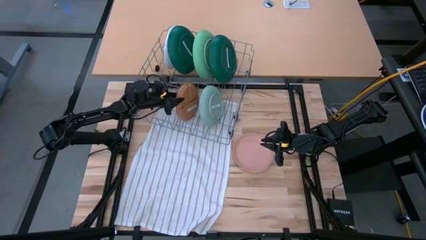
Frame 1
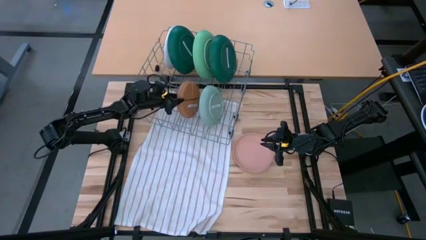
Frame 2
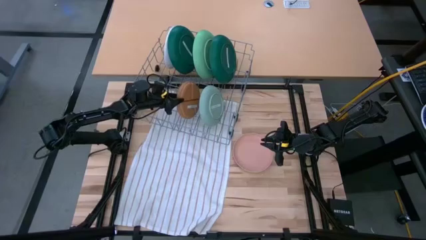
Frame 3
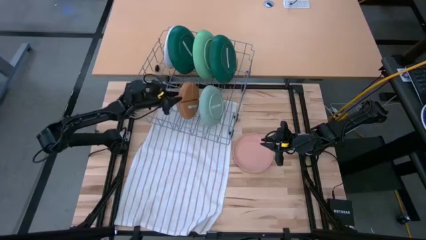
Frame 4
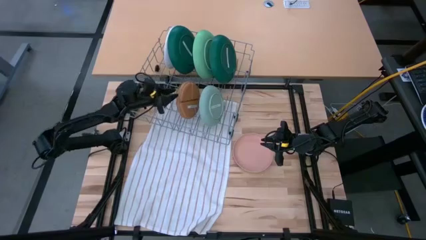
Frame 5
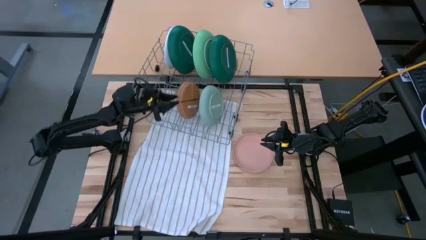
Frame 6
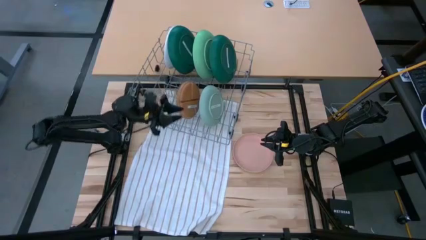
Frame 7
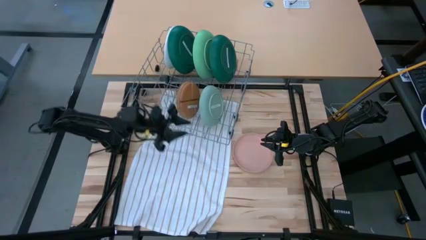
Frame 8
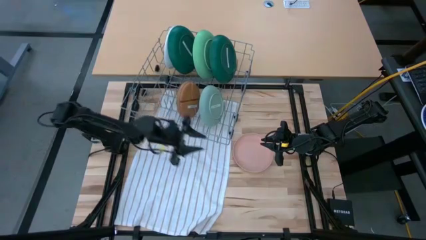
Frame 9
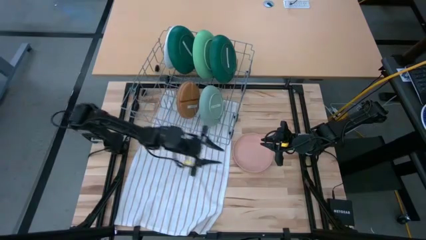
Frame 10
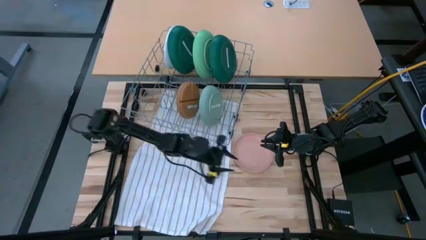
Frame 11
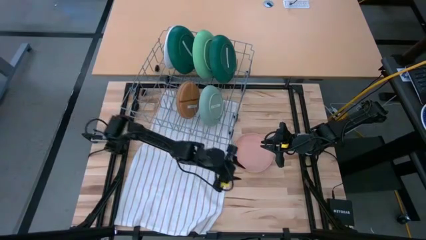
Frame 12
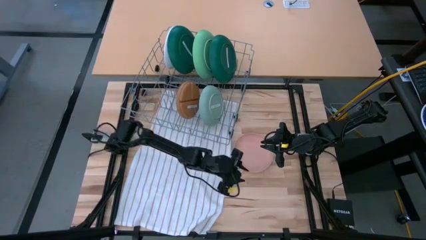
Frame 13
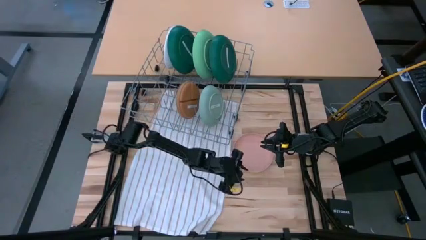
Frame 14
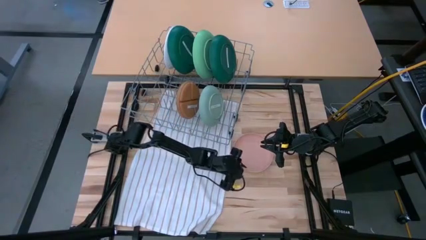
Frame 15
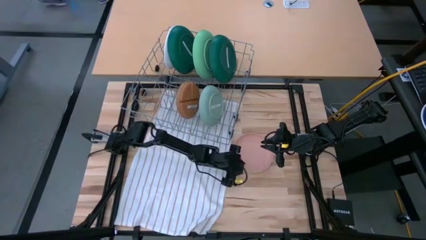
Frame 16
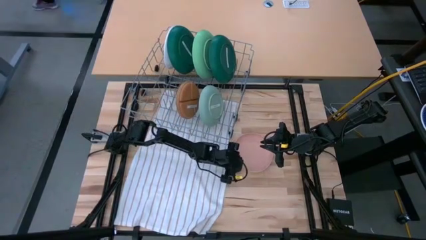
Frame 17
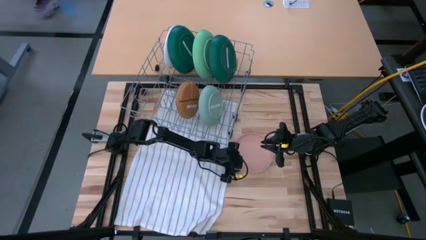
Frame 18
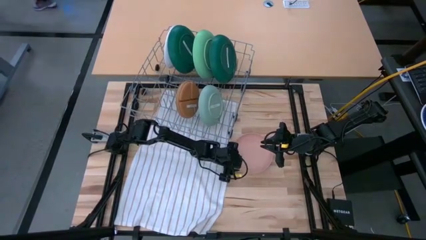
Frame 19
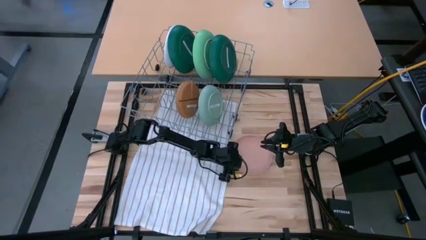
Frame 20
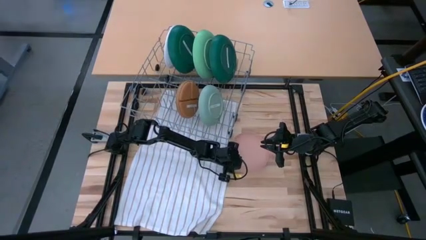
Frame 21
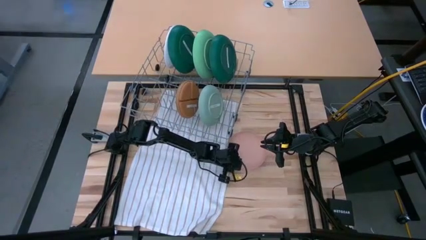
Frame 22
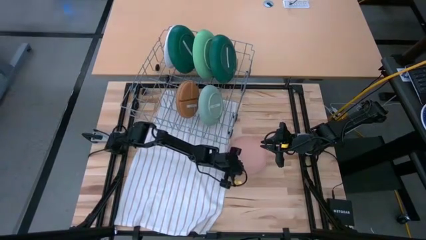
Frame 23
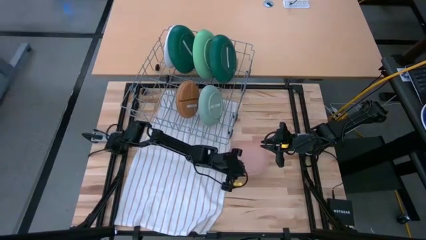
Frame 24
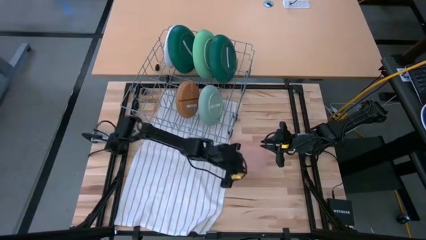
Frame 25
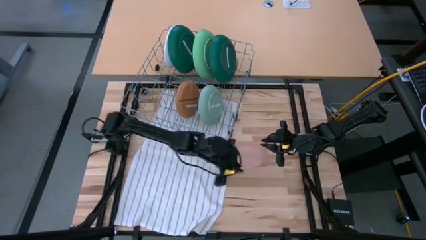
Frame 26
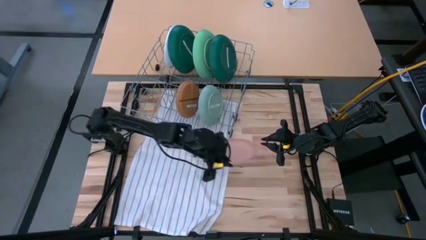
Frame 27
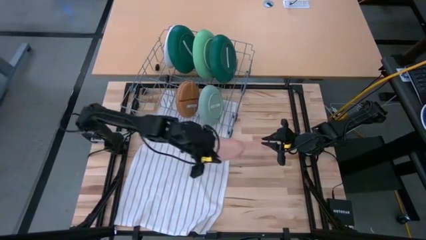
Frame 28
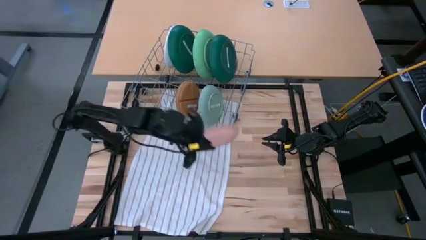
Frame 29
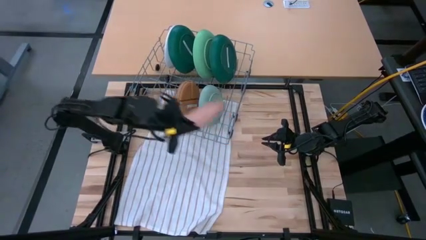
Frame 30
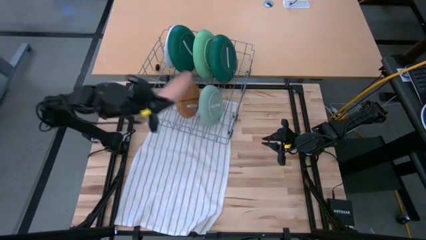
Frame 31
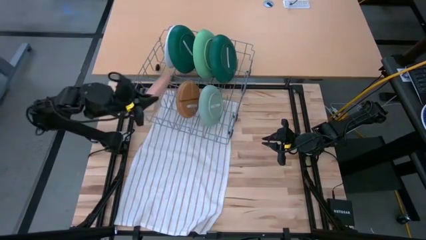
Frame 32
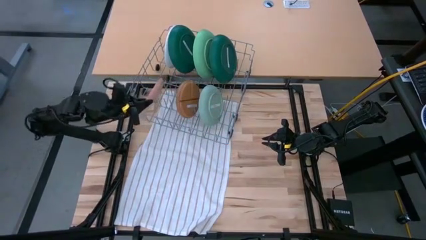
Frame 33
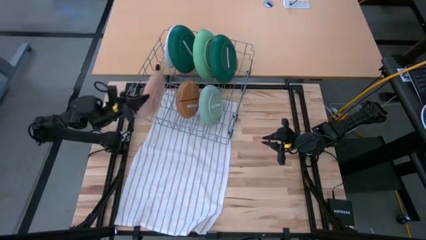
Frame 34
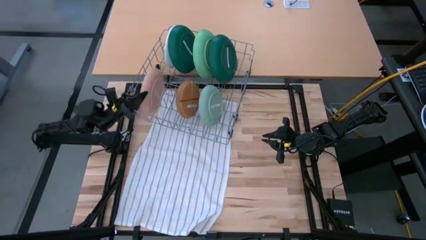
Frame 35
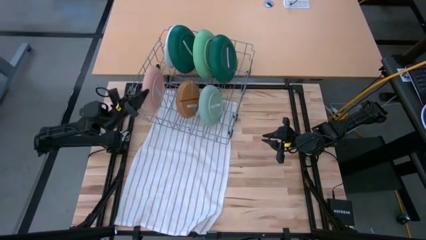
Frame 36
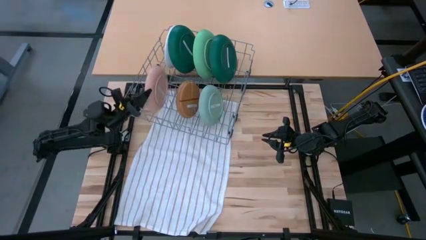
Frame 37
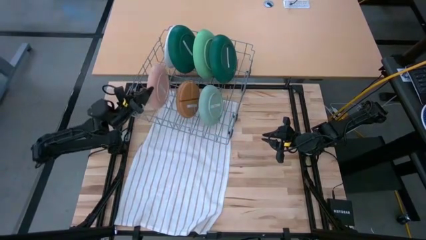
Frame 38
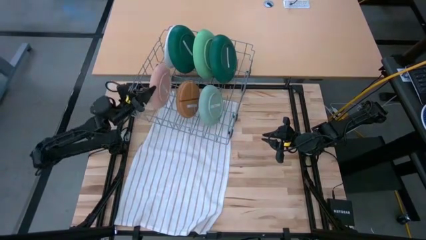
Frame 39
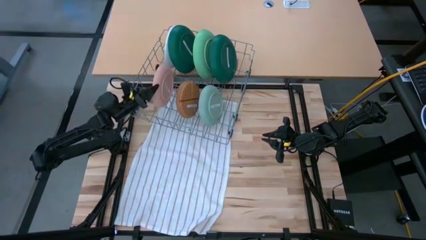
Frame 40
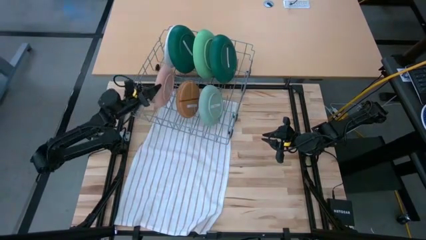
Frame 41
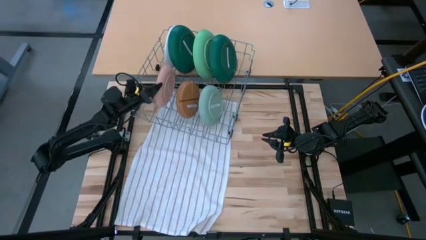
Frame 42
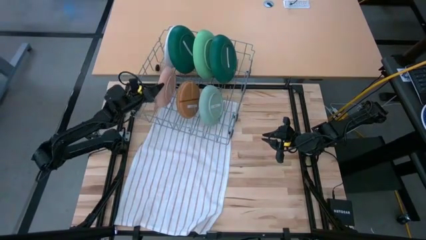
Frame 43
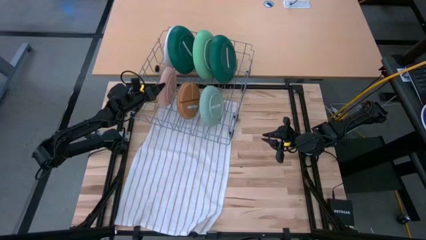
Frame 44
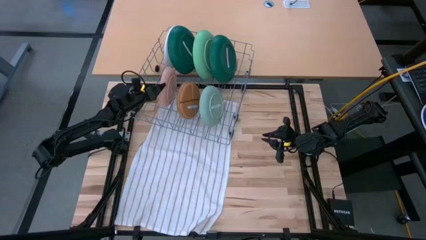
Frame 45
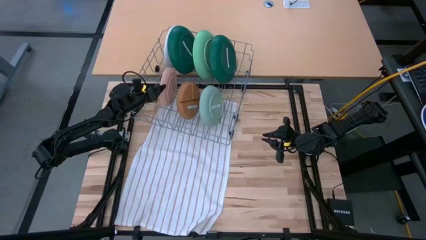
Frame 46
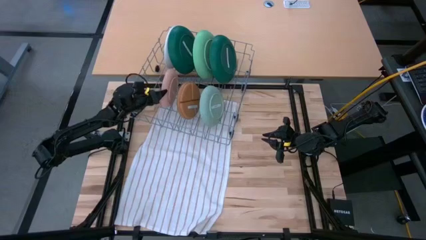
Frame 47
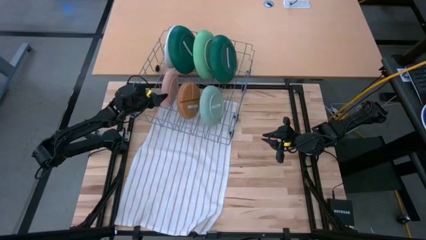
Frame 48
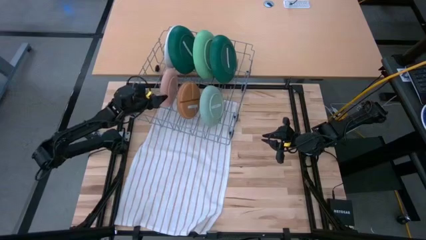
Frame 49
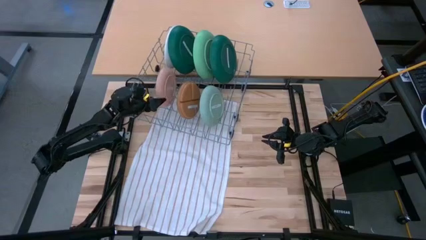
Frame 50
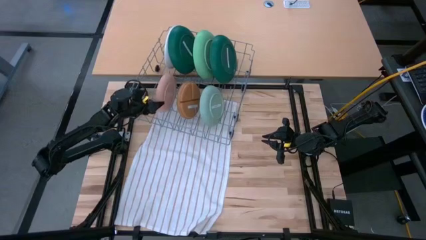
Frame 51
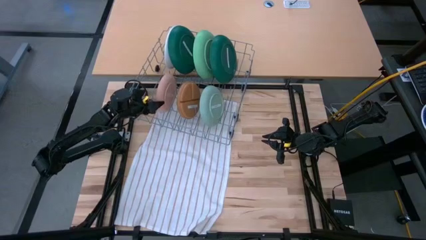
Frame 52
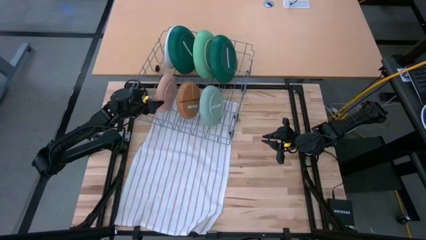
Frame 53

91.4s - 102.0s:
Task: Sort dishes
Put the pink plate into the dishwasher rack

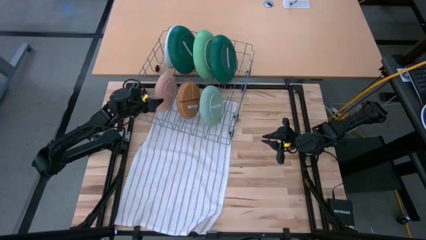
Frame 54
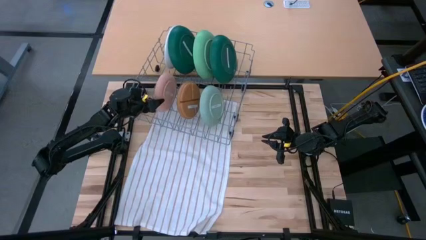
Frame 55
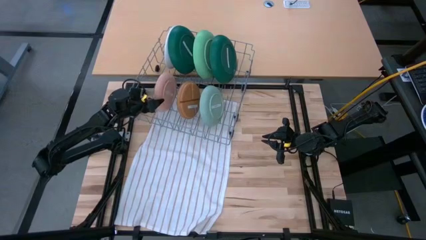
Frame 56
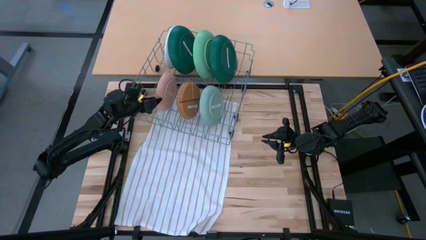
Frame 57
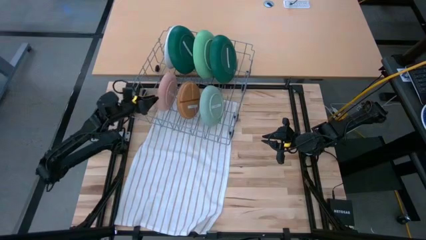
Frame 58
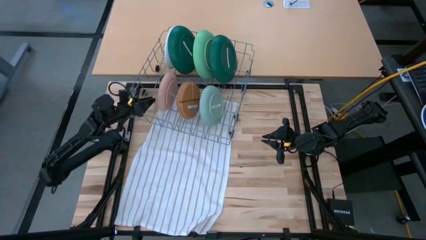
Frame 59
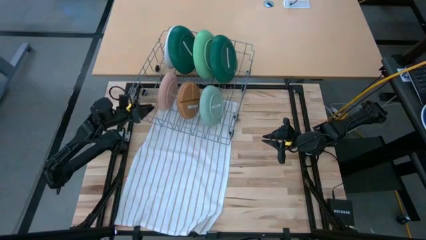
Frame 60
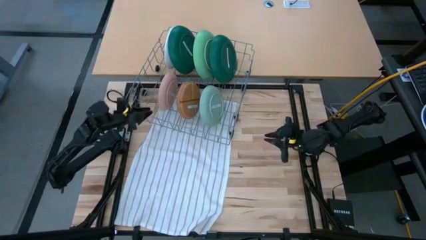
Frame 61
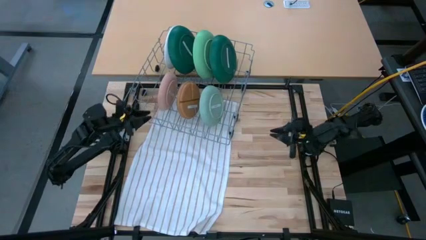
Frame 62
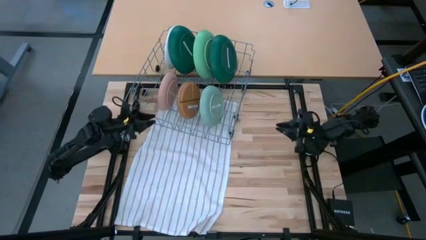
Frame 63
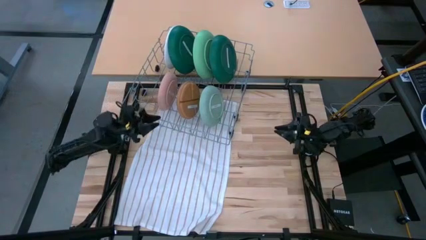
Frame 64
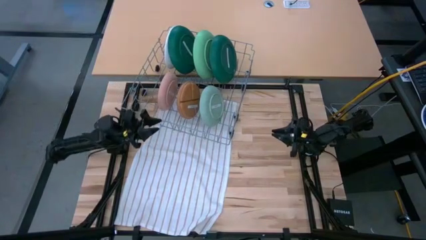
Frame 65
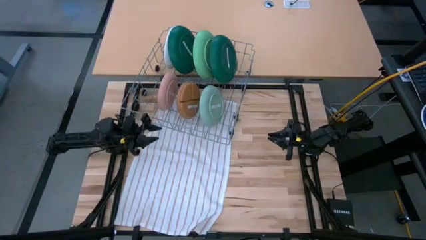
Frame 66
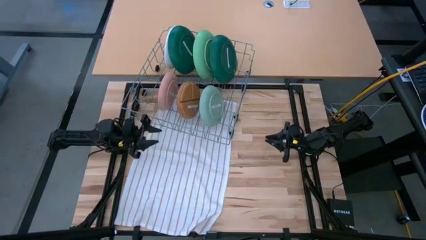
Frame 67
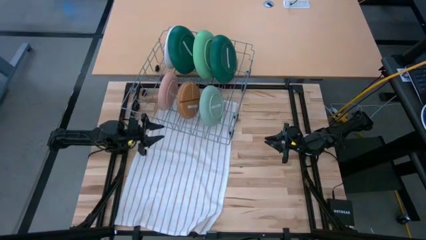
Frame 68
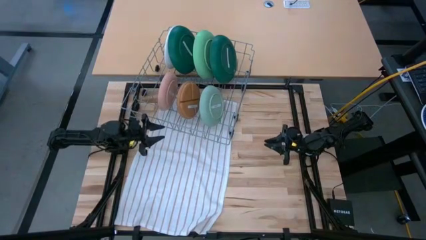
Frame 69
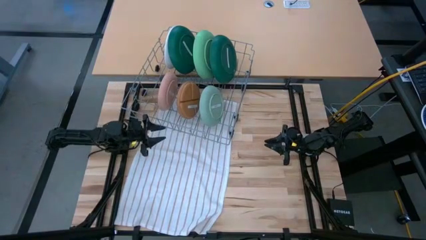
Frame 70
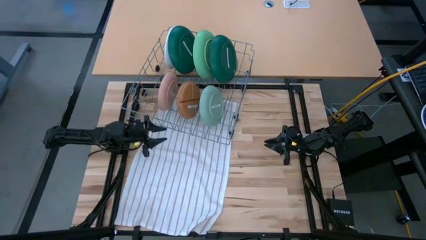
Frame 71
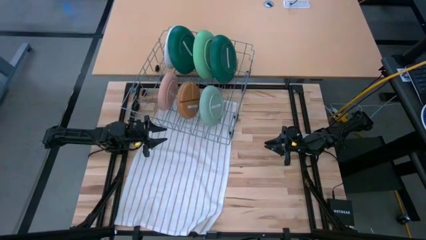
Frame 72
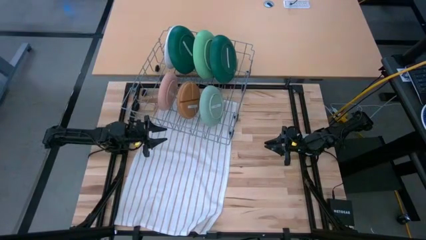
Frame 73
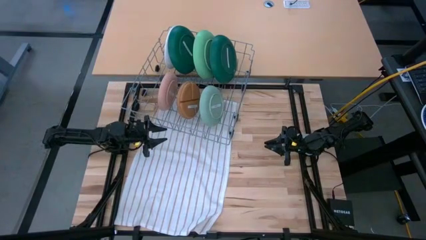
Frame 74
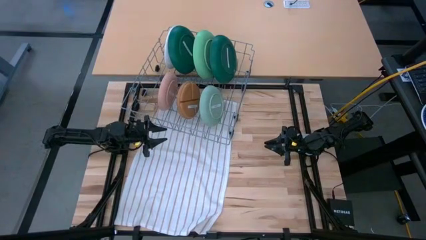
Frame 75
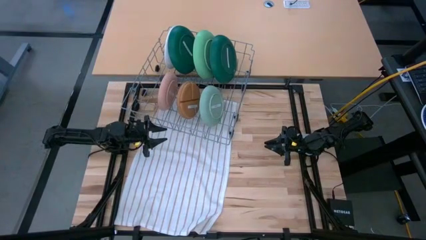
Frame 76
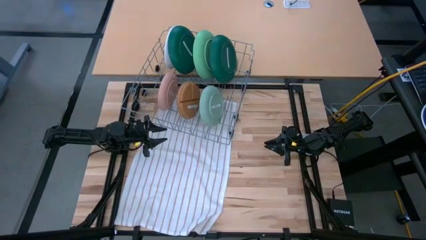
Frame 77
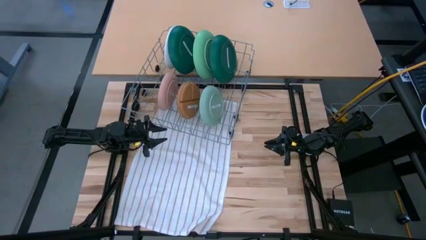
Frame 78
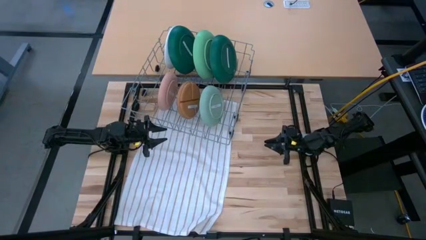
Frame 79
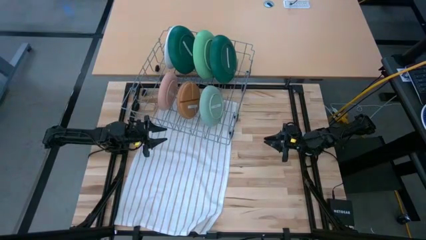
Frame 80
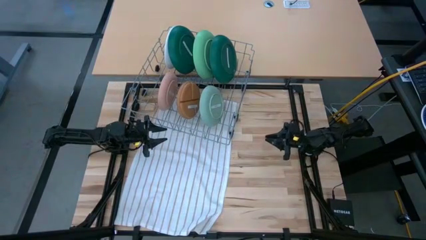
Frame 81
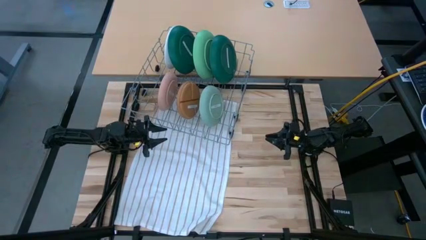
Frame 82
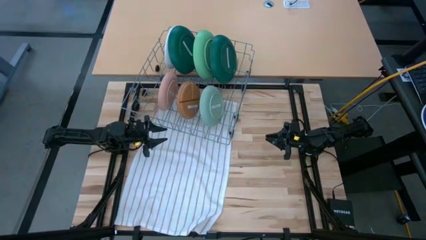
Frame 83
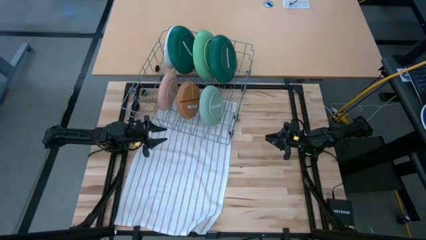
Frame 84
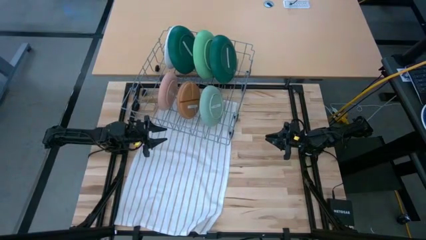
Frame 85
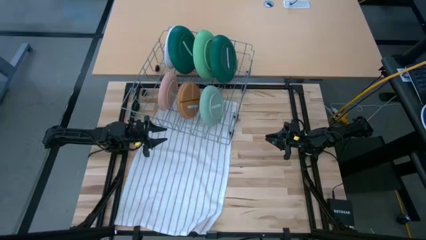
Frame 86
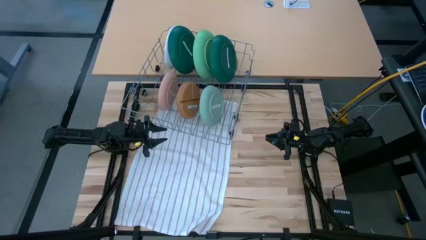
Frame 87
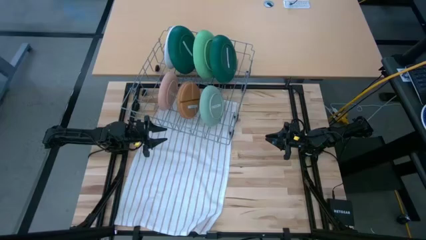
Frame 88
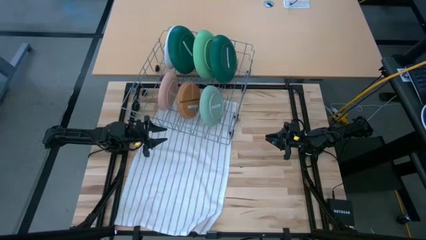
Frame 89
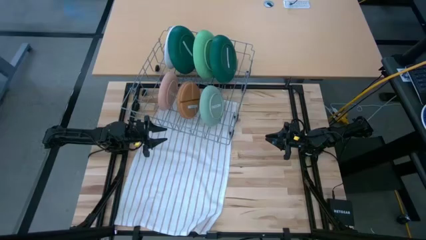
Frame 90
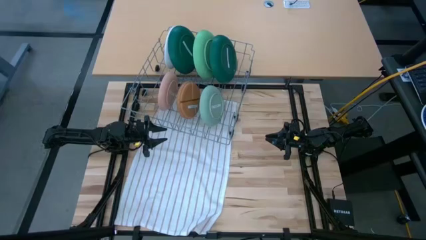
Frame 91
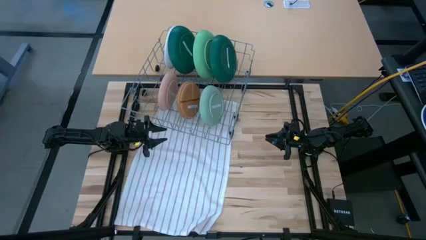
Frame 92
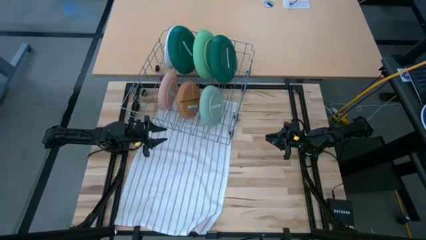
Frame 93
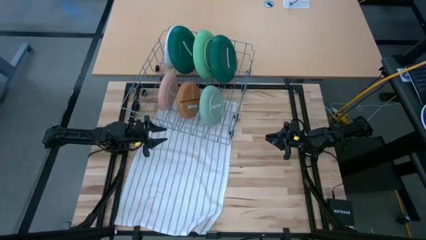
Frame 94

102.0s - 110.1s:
Return to Home Position
